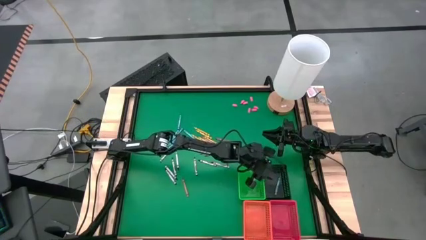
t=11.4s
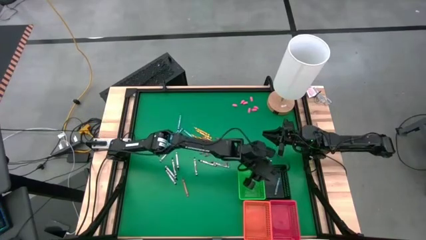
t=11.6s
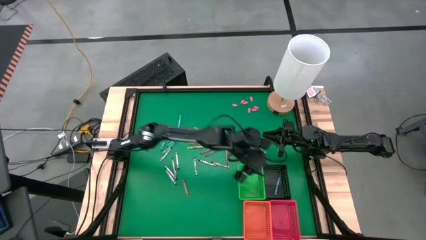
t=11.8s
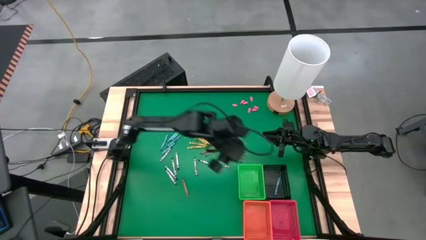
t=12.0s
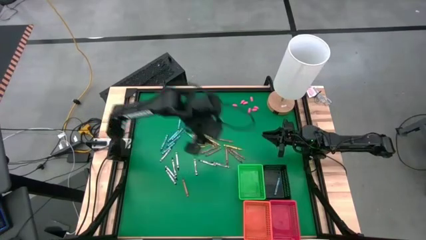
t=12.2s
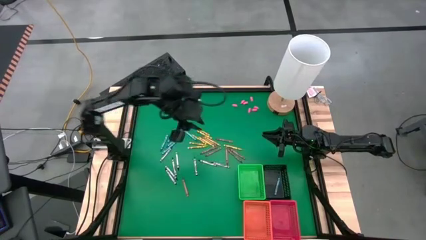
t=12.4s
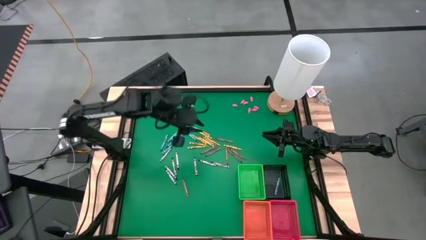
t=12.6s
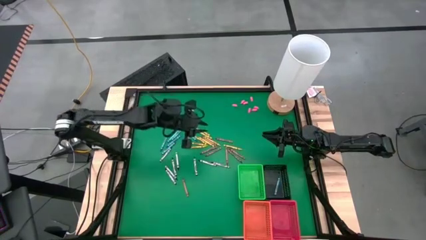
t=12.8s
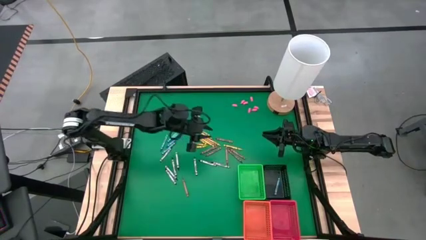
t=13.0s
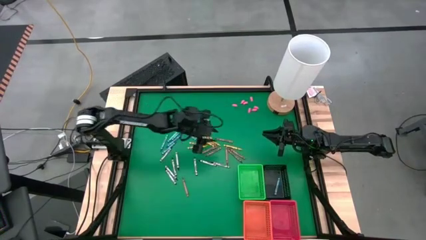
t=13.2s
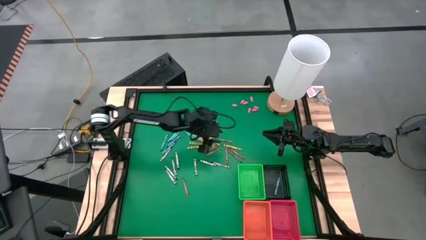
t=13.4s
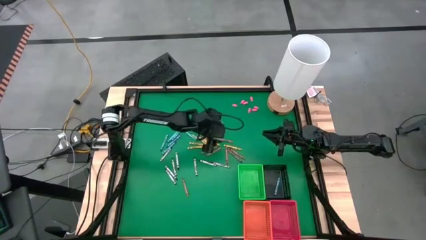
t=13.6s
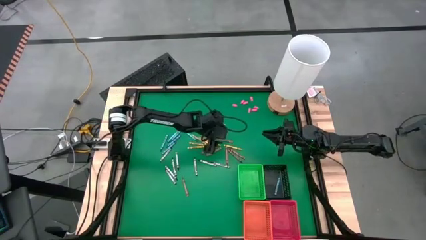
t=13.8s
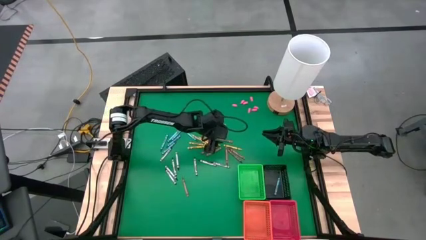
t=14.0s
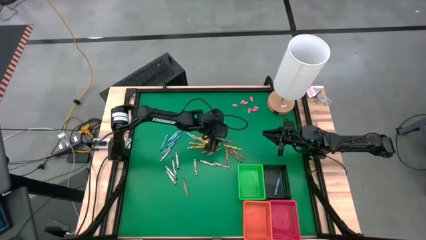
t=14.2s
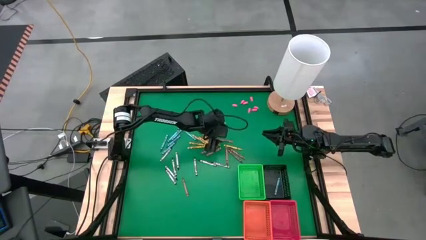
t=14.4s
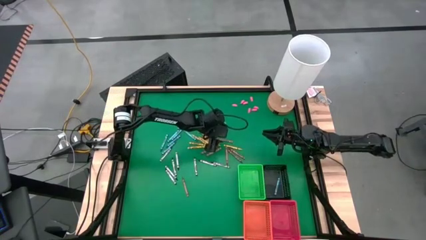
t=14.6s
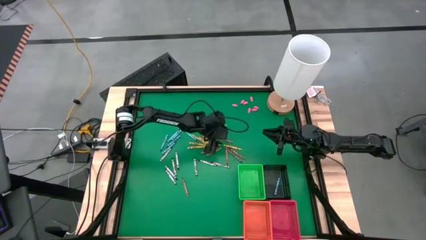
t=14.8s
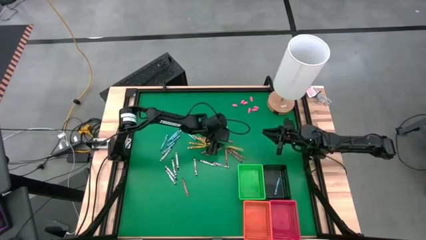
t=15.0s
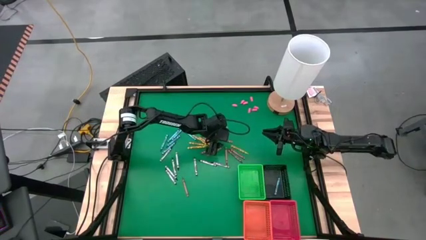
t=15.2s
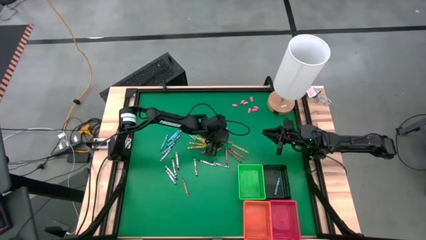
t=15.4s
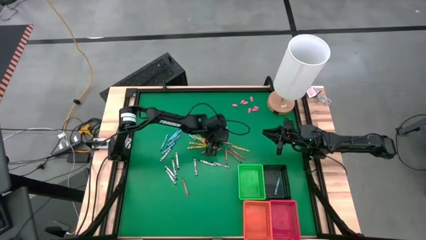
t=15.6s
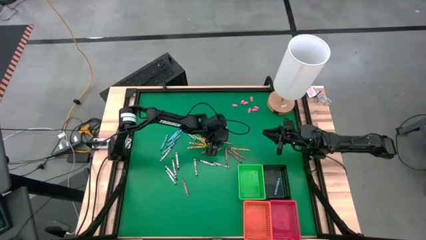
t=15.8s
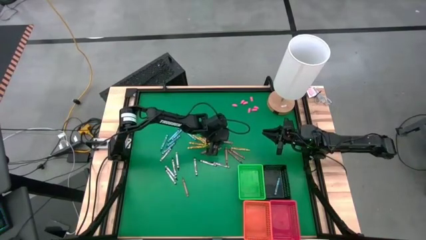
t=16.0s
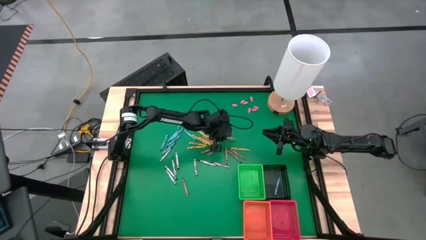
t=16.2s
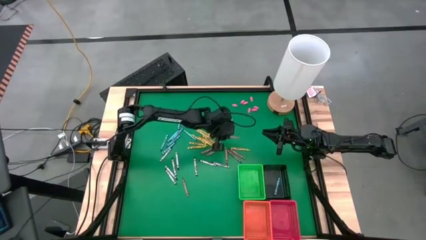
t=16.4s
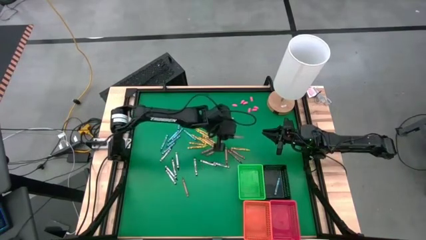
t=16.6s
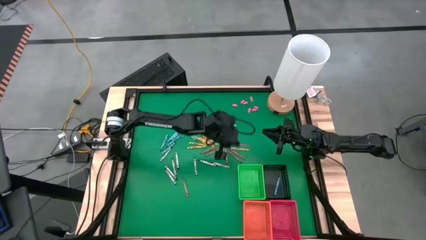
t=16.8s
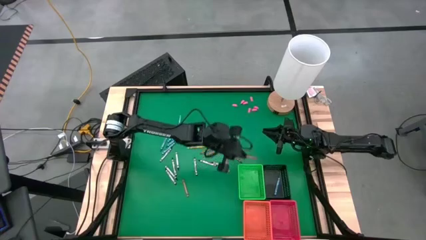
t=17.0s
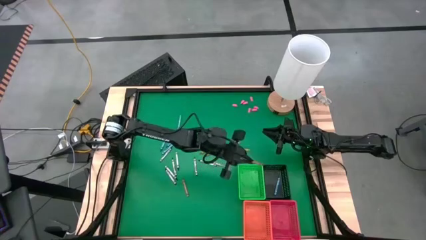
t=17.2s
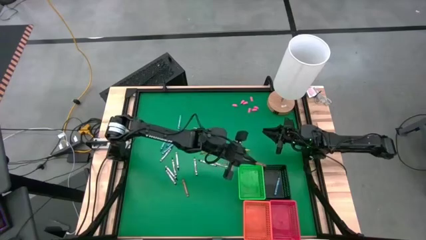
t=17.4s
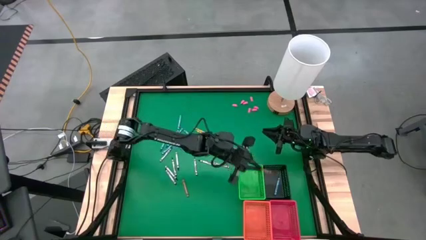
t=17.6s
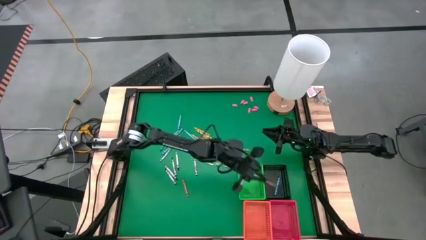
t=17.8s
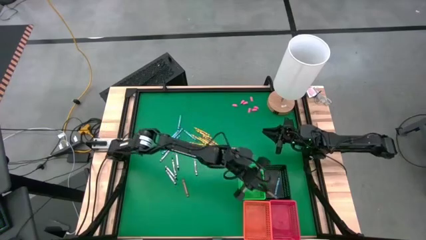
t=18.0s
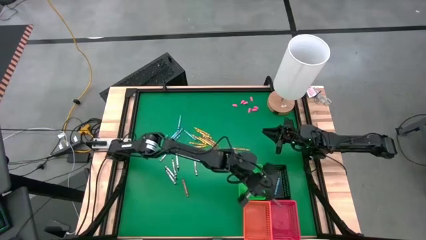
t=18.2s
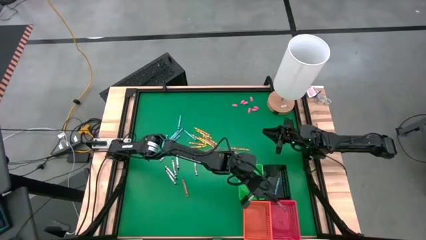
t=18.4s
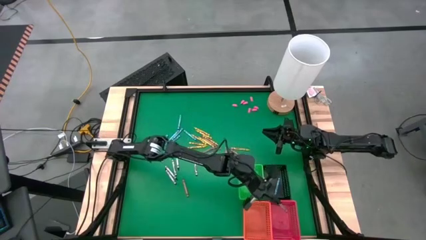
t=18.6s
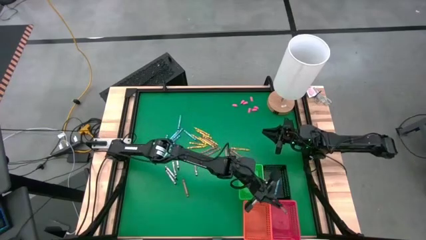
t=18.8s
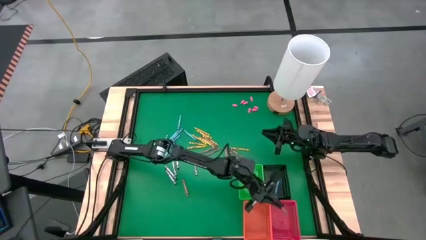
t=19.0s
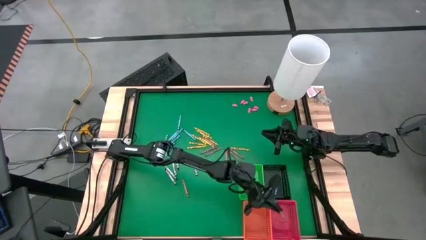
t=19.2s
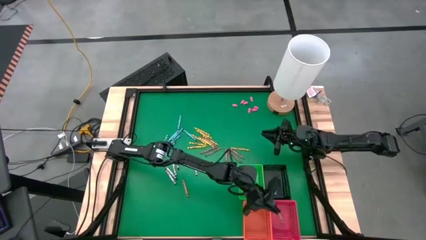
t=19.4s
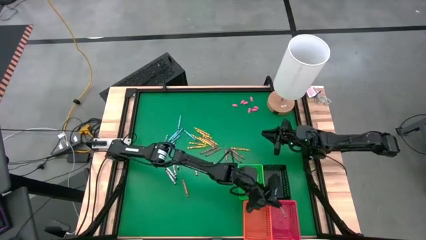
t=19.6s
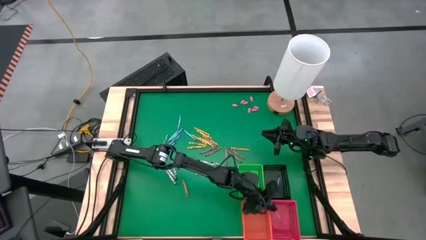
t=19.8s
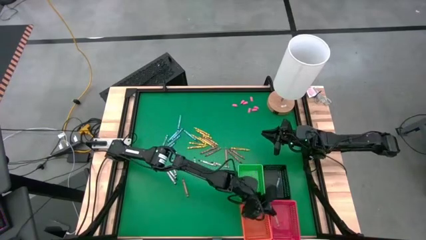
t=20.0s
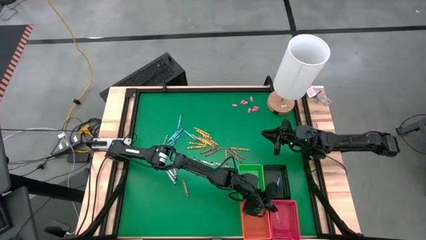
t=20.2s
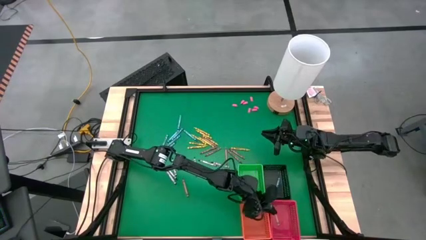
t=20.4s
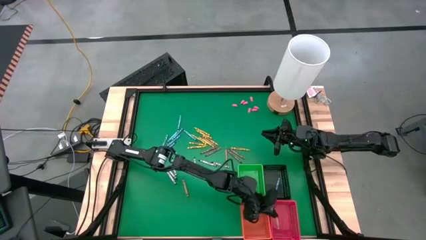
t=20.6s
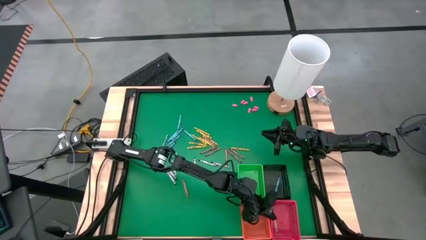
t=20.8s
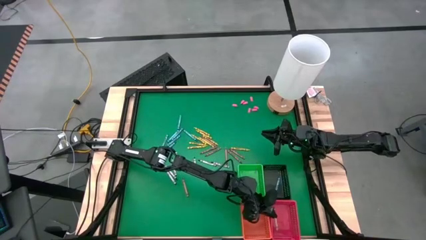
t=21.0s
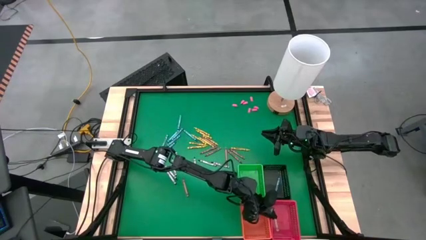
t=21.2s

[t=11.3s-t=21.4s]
Task: Sort crayons
Put the brown crayon into the red bin

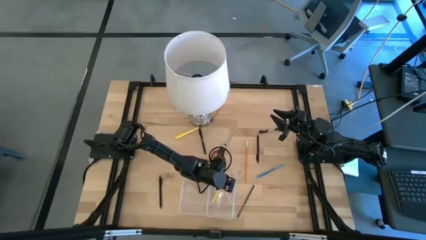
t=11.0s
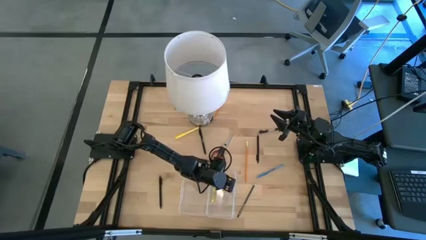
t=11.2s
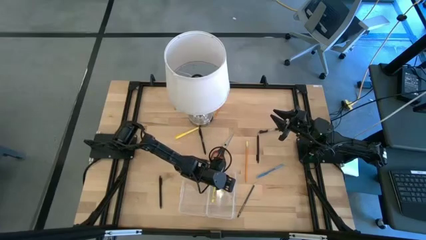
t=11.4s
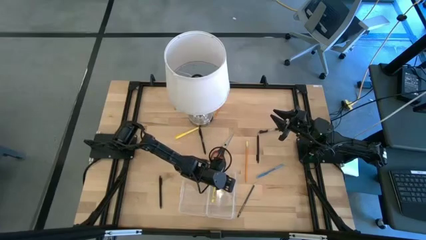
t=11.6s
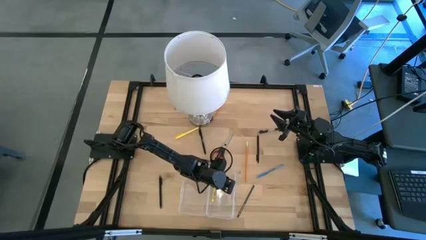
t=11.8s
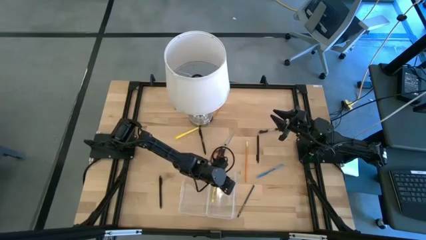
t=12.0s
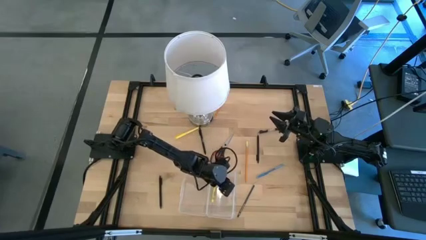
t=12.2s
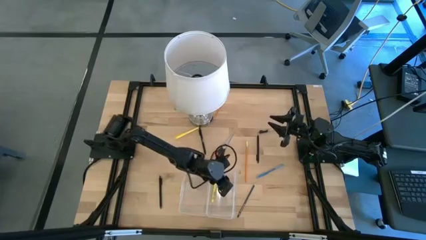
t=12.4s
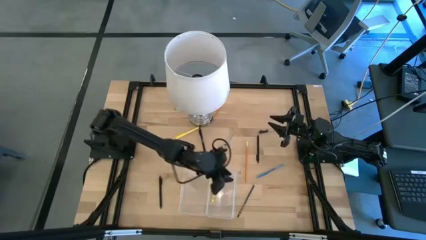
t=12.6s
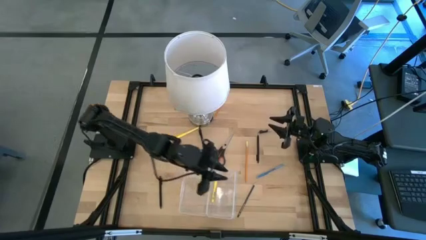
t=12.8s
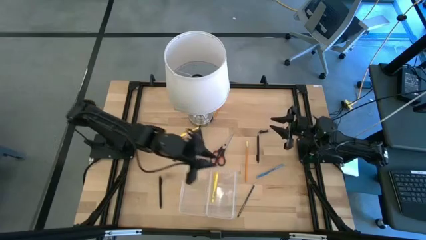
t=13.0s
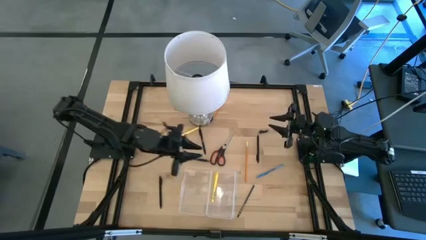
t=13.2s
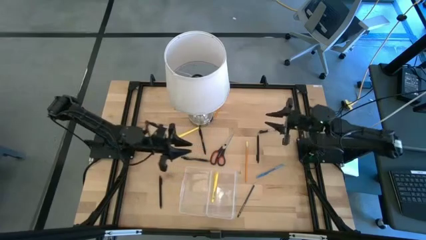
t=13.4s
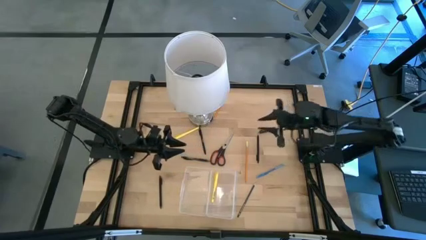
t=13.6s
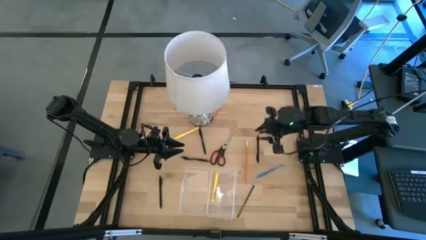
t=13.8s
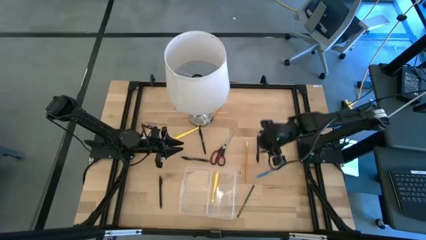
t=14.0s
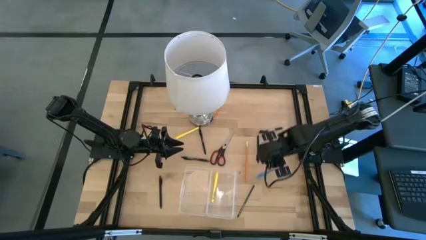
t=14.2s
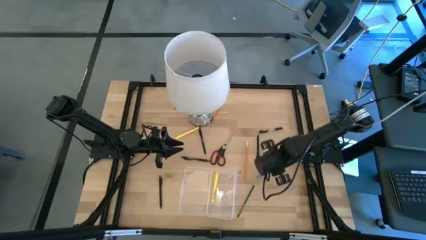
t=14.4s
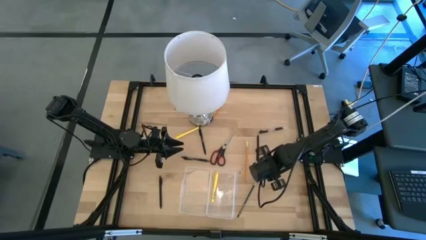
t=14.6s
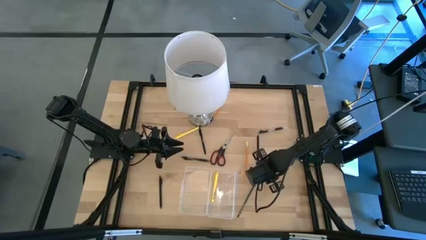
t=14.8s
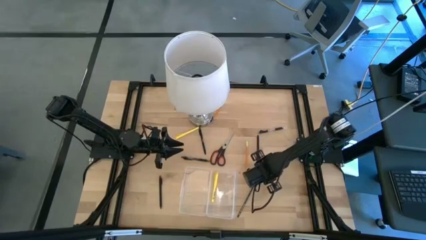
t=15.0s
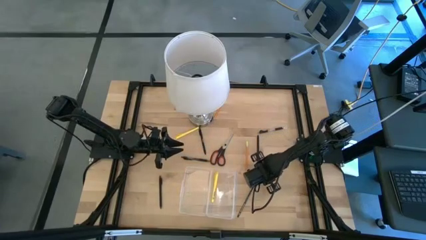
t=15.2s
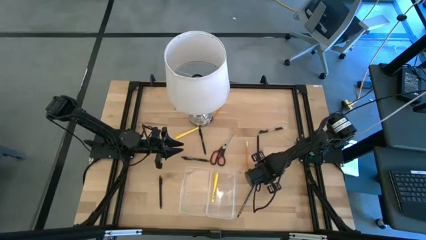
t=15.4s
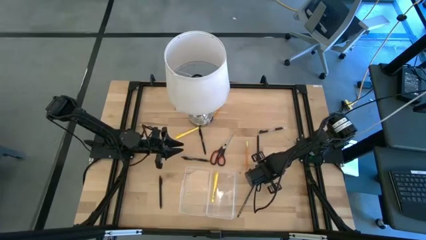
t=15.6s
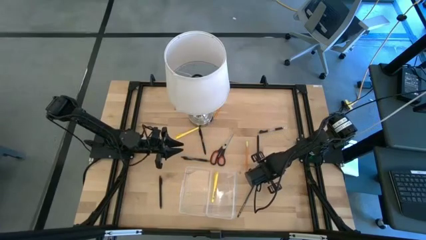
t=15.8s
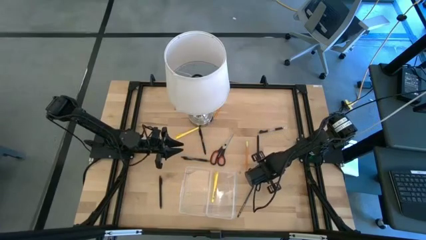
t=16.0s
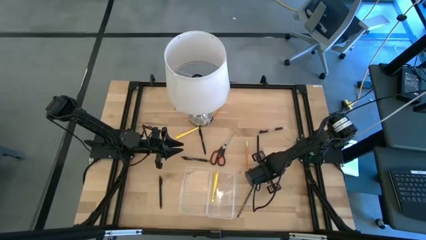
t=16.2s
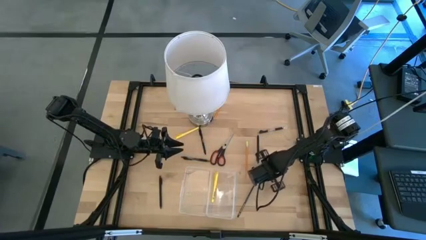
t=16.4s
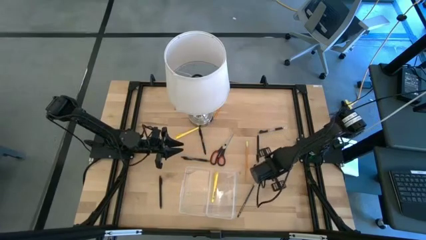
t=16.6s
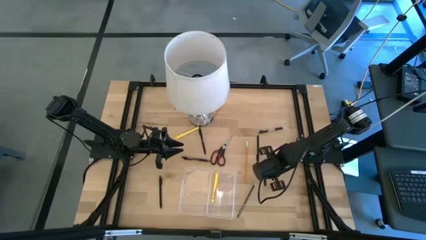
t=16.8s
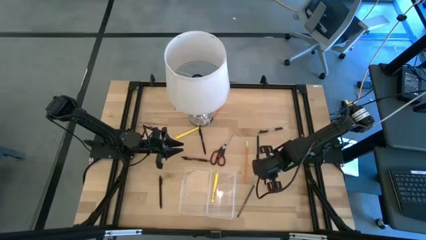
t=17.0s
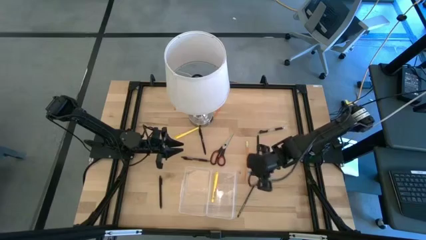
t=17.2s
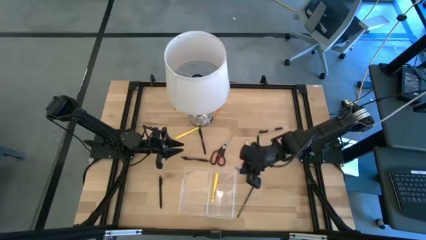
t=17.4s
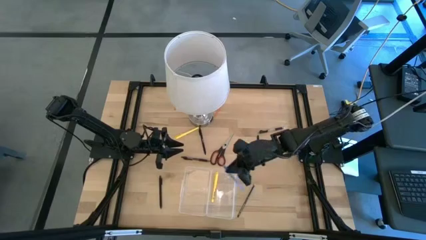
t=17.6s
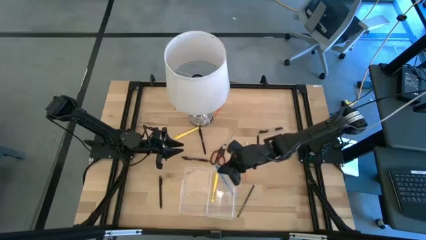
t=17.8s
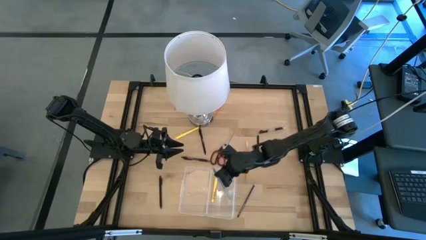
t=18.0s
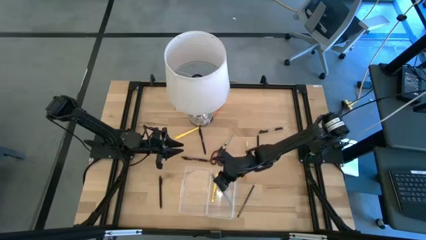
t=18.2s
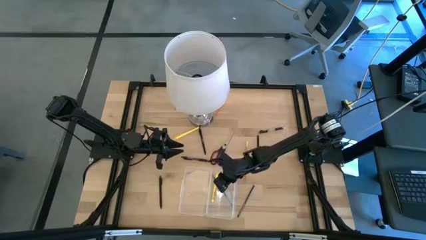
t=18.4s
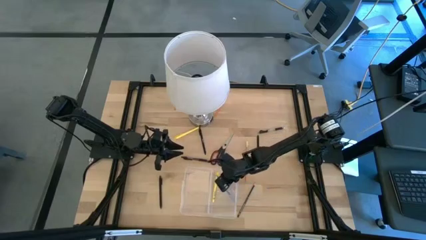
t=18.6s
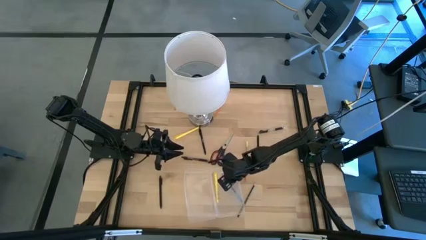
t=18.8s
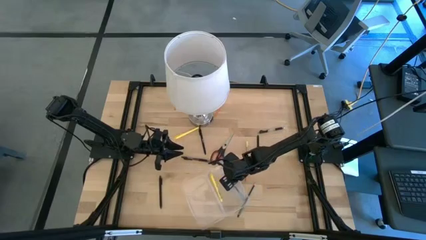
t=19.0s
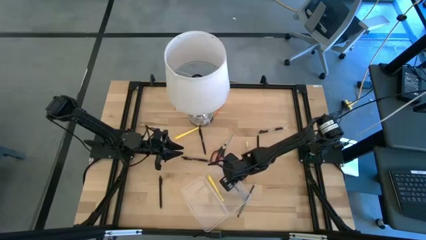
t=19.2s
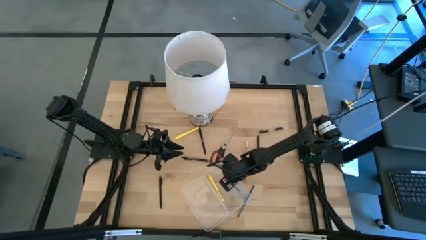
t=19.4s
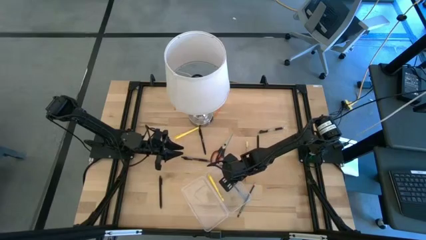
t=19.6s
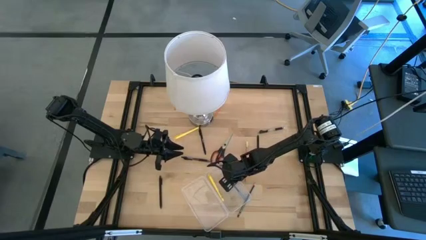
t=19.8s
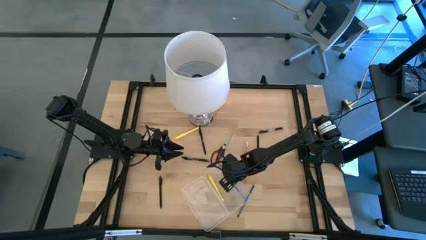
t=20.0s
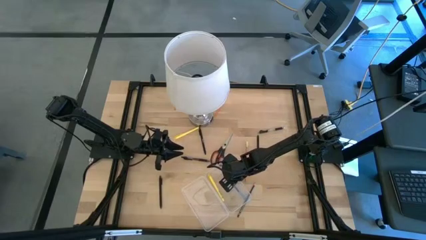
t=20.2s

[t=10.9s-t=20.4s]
Task: Pick & place school supplies into a supply box
Put the blue pen into the transparent supply box
